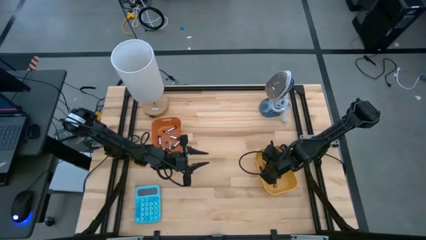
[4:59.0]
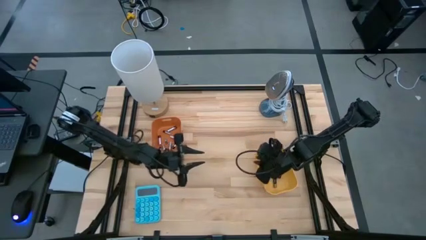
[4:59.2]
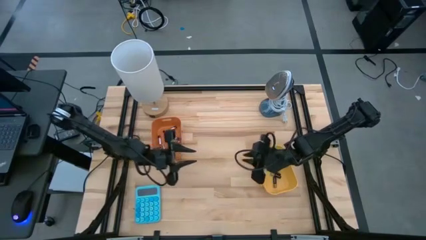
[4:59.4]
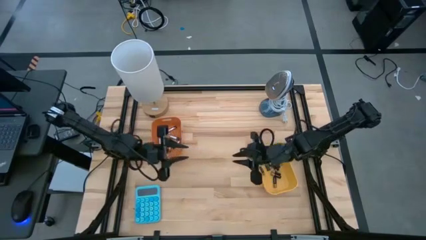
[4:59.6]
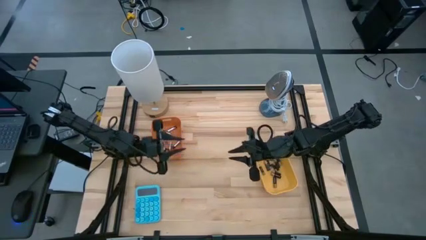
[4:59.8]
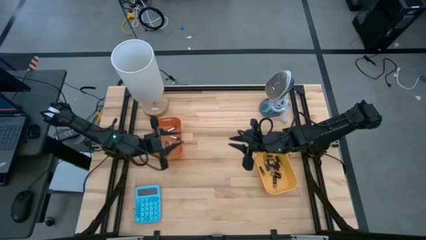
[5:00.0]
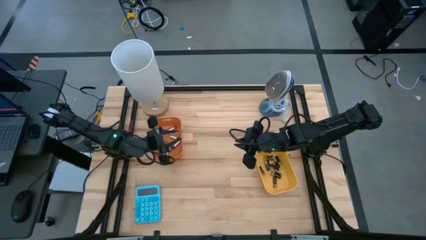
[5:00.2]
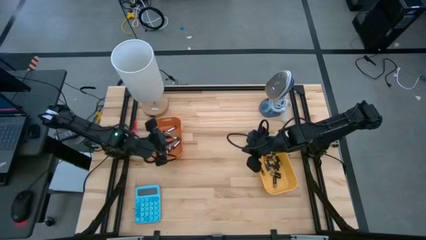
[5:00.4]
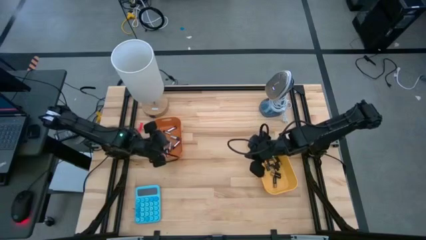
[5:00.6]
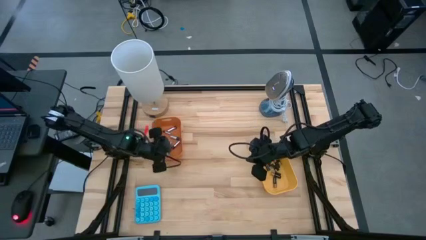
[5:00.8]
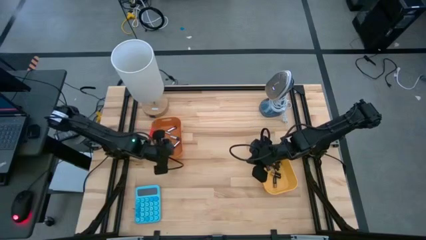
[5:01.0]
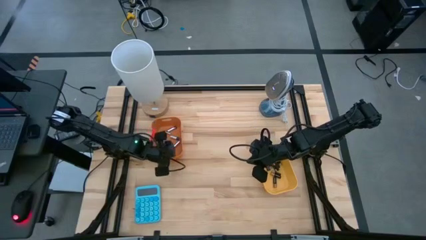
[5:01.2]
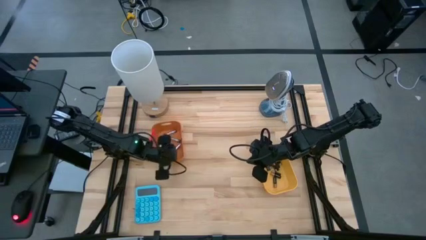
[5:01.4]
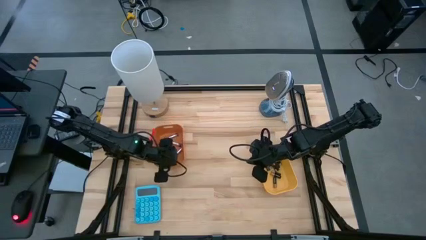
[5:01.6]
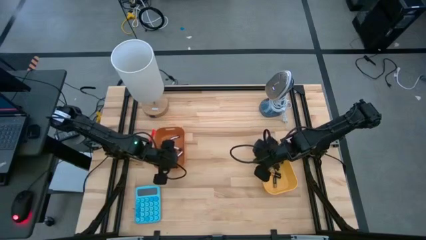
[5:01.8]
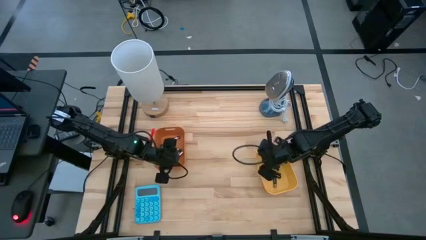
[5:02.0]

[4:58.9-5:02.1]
Task: Sort batteries
Adjust the orange bin

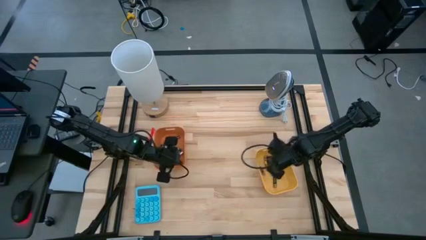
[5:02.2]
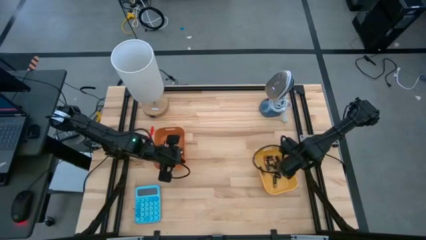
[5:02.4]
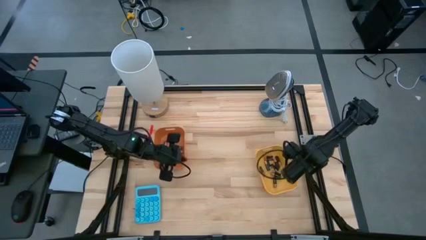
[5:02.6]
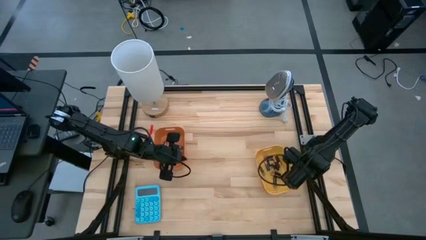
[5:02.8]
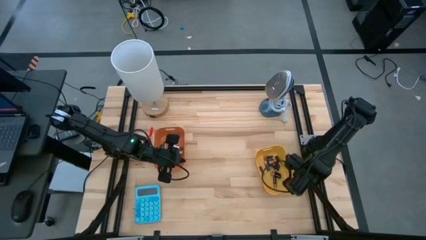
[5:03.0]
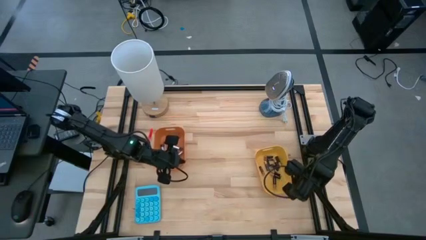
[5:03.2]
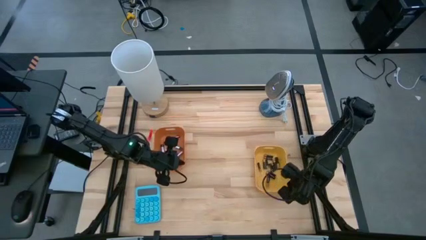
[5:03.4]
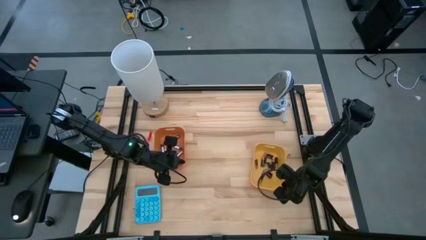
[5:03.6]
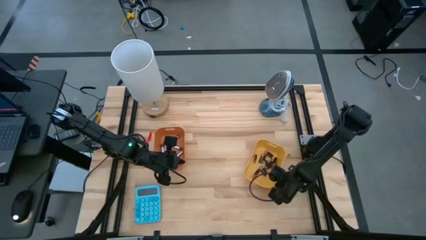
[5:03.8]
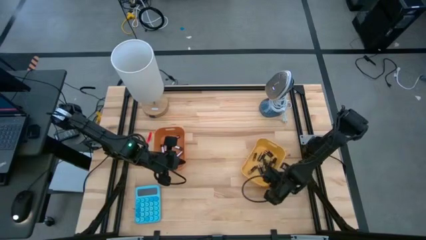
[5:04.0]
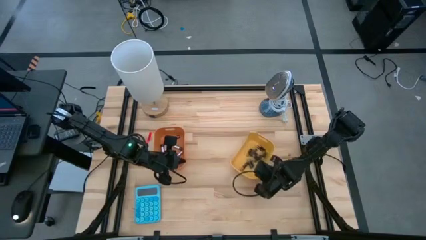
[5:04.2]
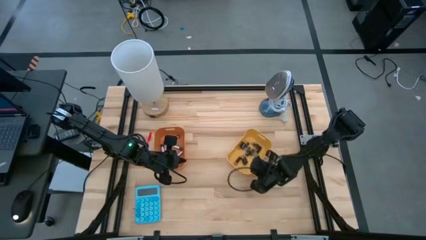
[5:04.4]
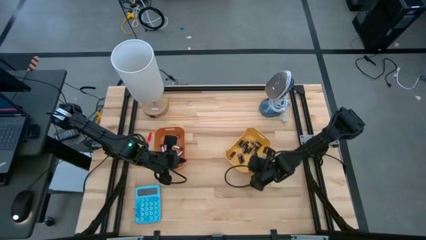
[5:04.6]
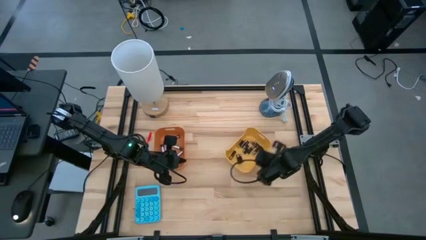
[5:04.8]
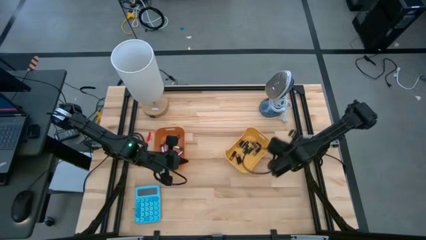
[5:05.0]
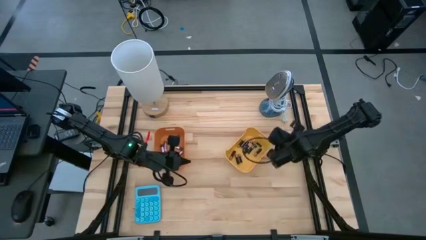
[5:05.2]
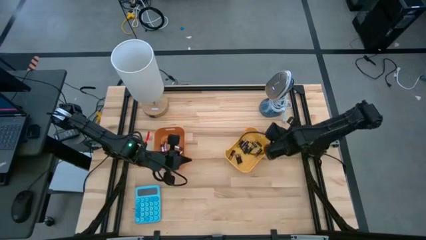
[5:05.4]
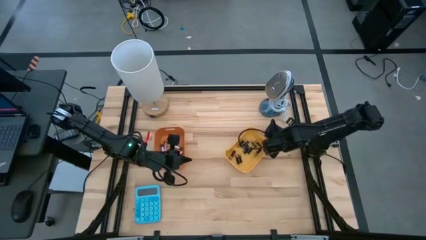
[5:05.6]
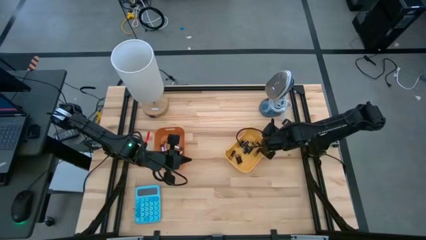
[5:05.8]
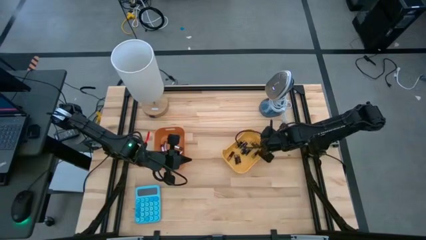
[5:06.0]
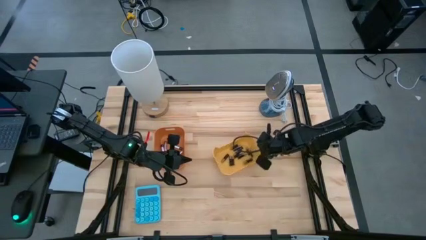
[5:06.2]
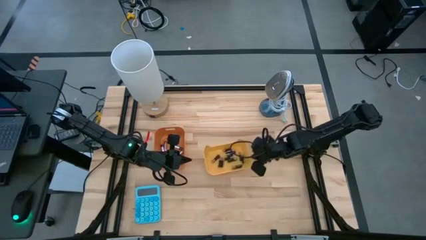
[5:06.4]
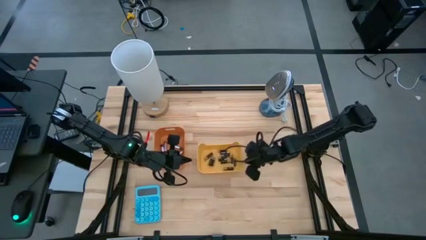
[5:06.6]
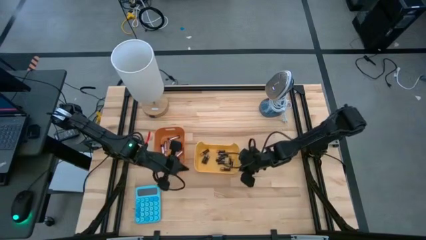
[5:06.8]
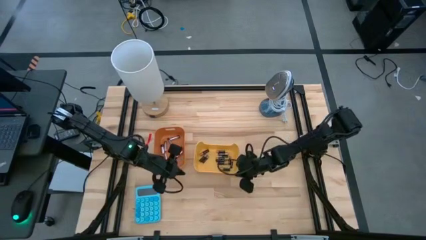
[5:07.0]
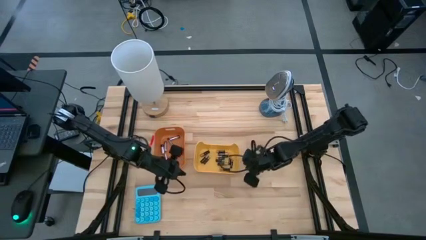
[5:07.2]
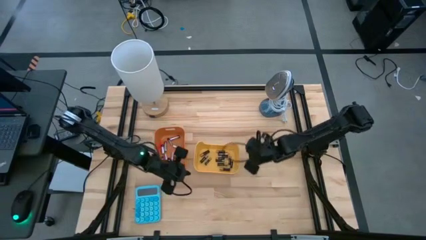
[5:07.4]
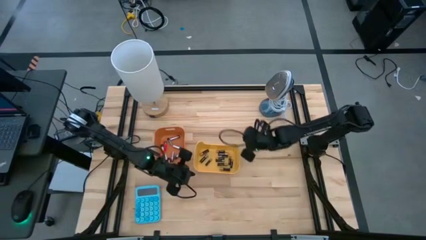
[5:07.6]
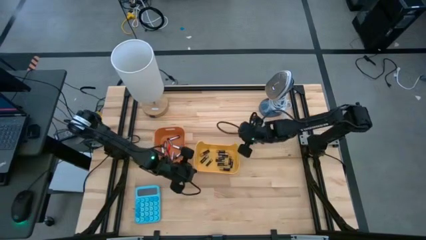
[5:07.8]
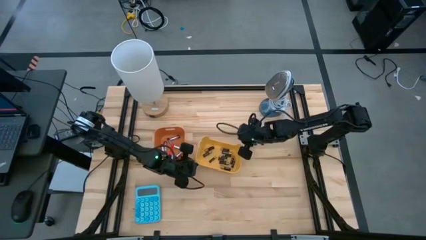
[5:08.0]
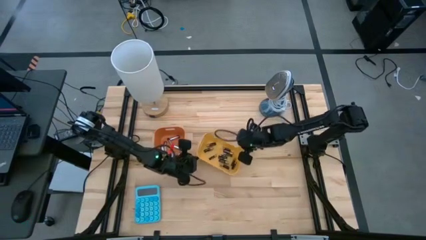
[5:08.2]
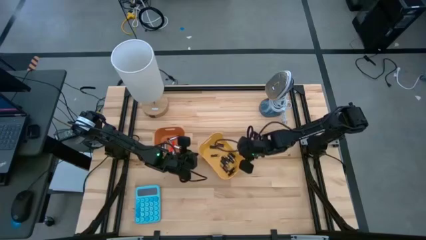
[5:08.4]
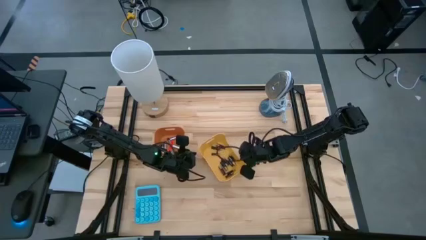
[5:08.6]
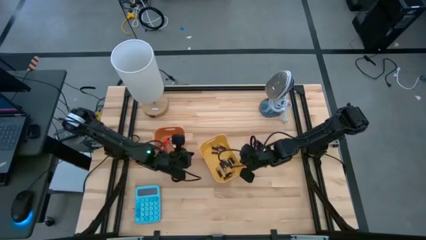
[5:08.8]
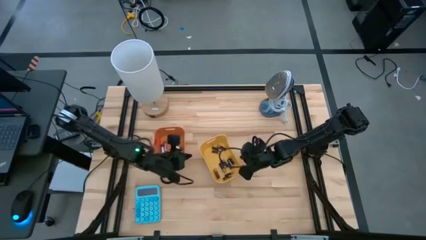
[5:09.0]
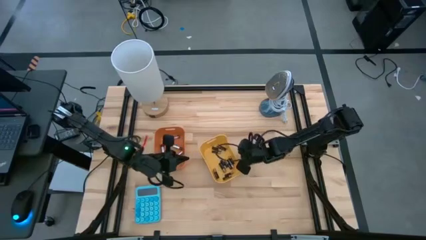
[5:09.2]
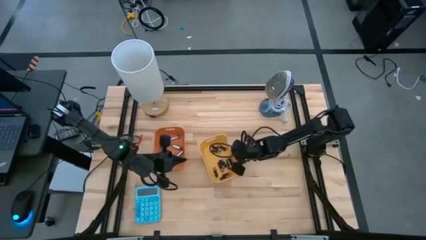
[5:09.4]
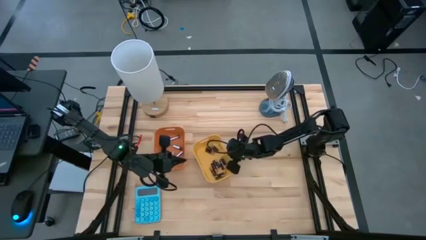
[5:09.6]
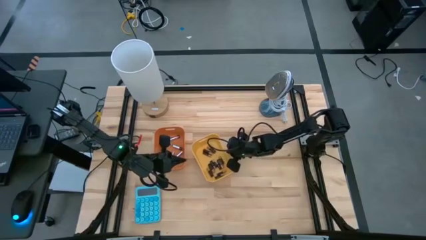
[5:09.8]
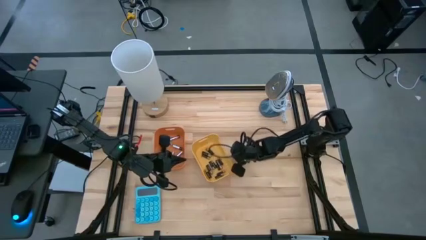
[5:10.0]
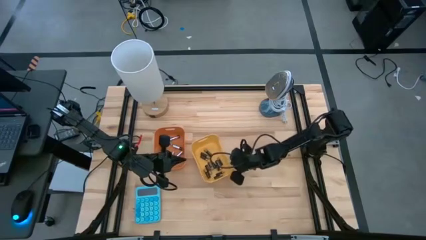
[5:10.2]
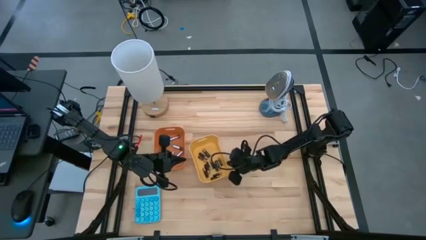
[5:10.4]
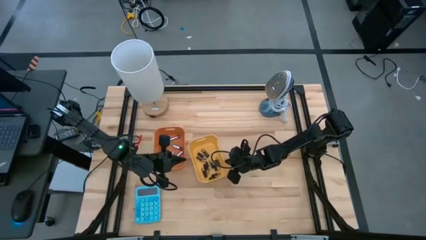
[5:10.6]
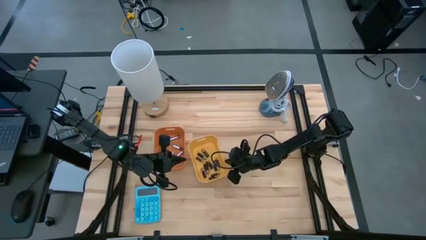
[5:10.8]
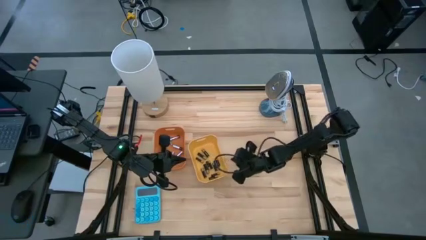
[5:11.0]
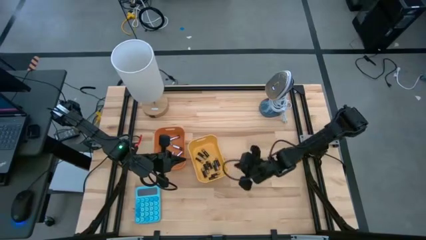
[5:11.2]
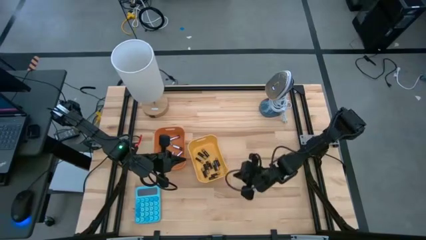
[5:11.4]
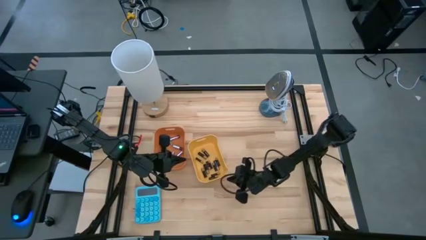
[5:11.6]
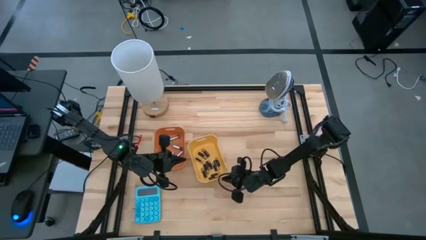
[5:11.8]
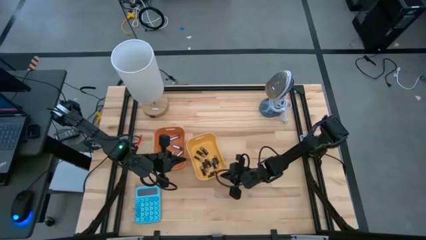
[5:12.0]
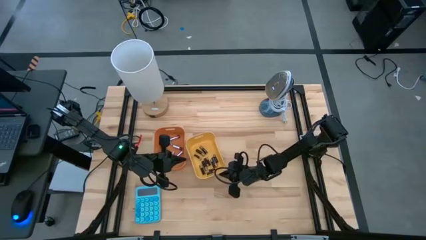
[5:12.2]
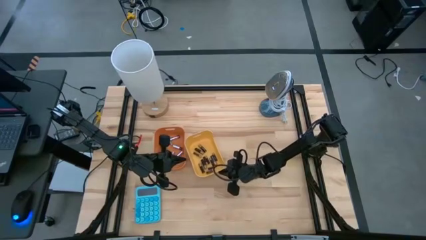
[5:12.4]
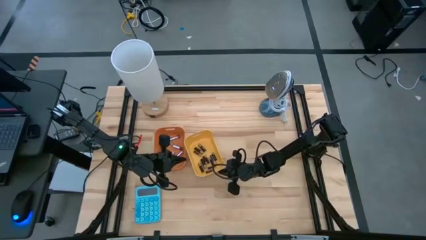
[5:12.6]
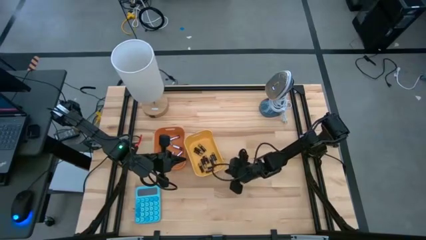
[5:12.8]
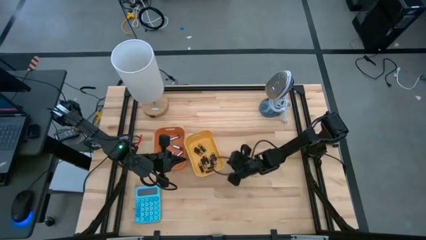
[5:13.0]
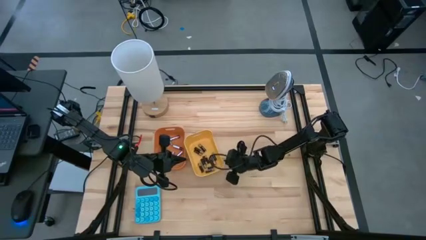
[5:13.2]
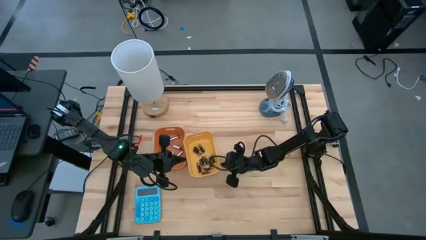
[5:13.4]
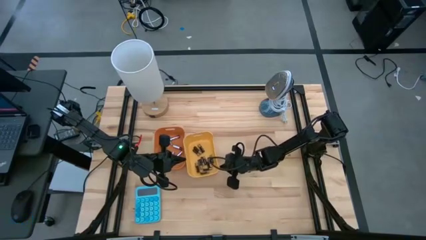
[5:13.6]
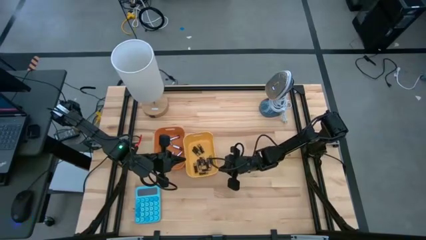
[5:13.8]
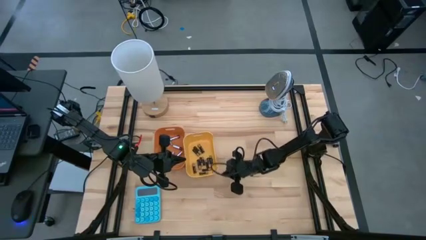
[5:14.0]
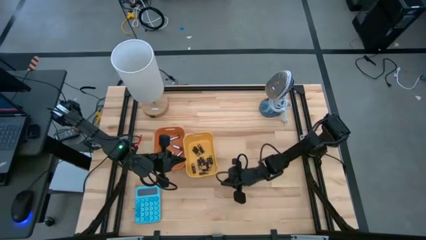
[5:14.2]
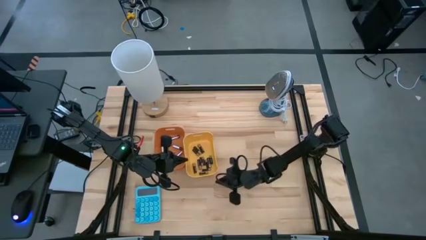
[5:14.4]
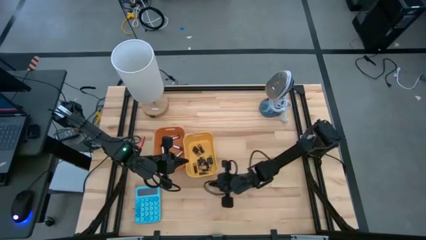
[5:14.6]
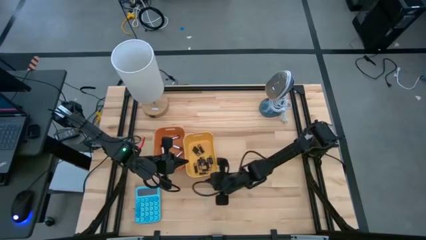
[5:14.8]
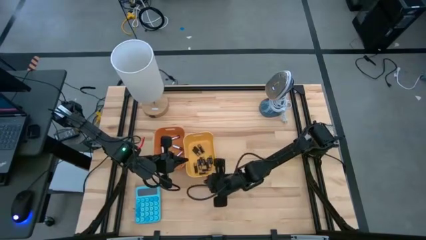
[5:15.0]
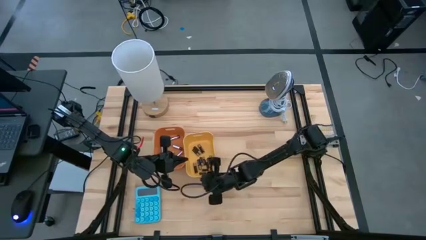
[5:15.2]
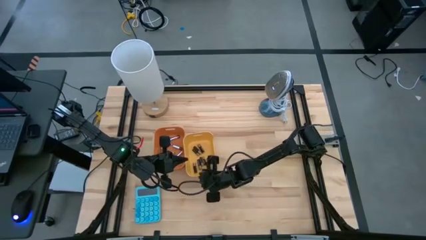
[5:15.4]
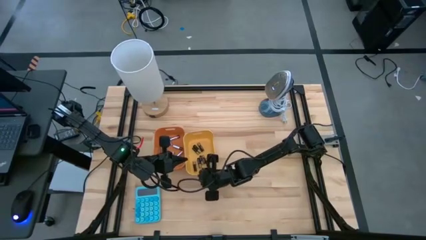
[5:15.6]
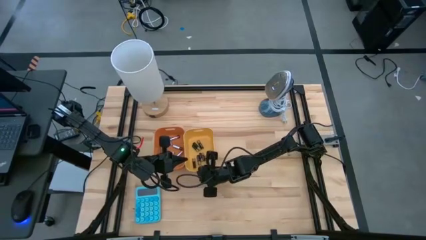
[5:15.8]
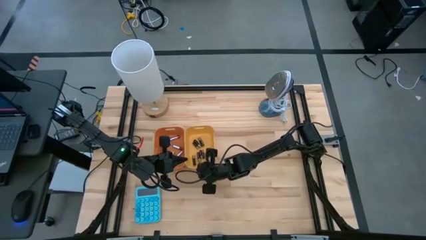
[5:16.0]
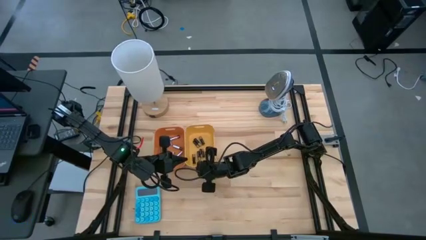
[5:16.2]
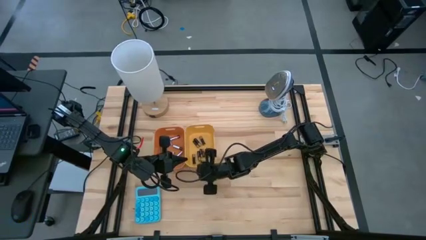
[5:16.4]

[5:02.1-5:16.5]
Move the yellow bin to the right of the orange bin
